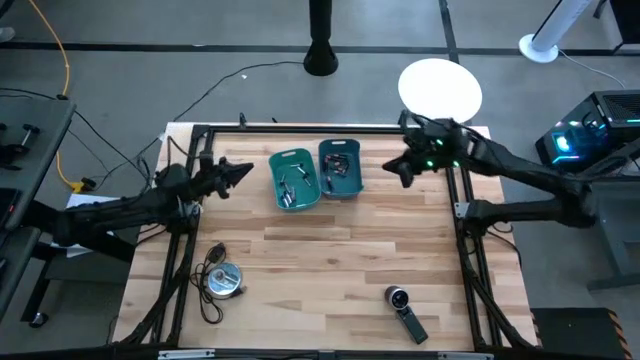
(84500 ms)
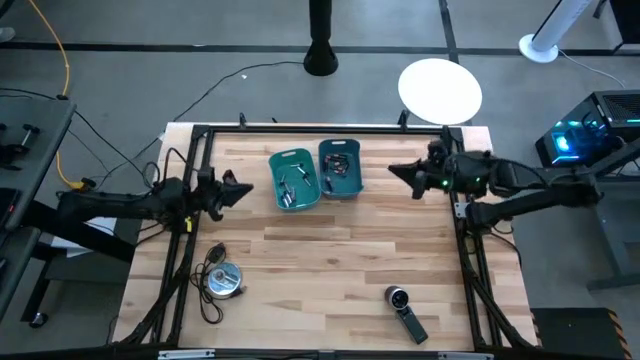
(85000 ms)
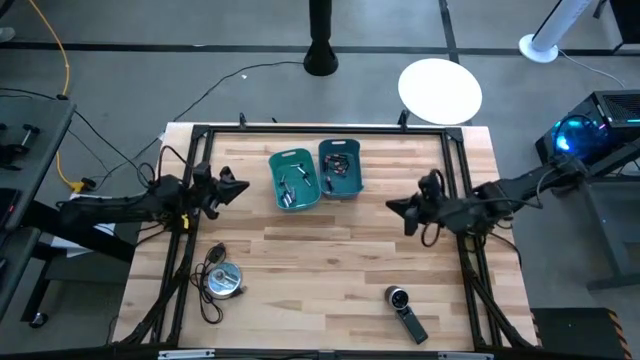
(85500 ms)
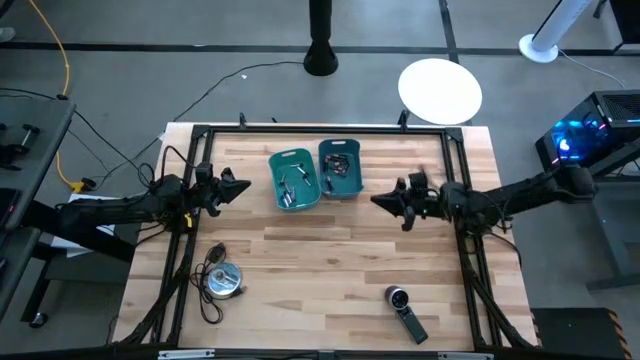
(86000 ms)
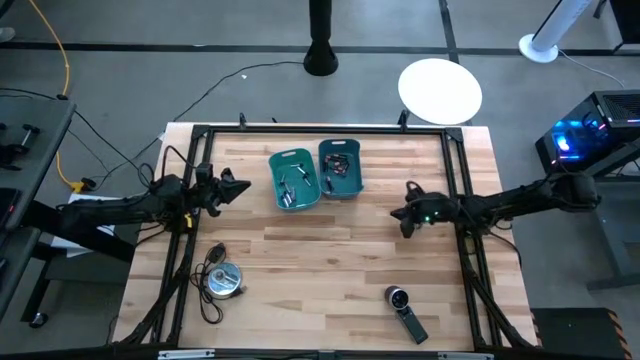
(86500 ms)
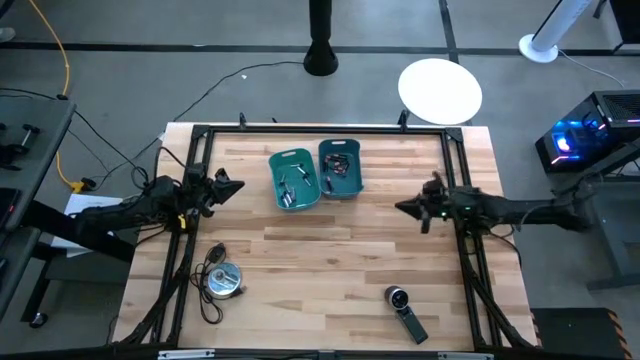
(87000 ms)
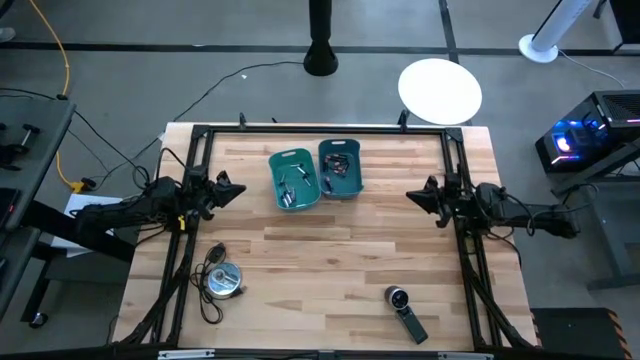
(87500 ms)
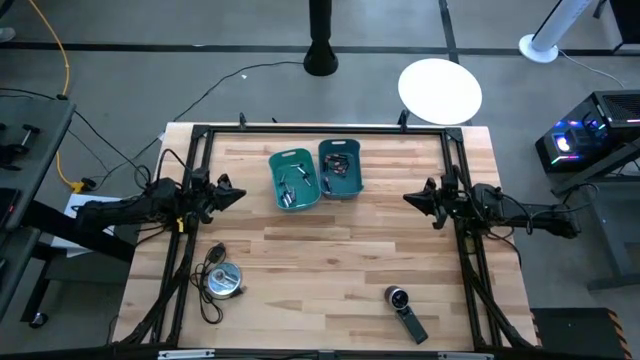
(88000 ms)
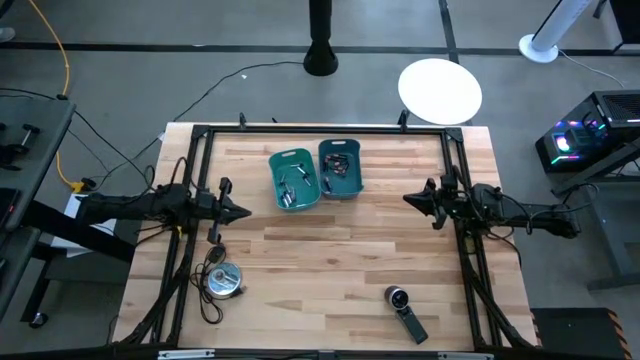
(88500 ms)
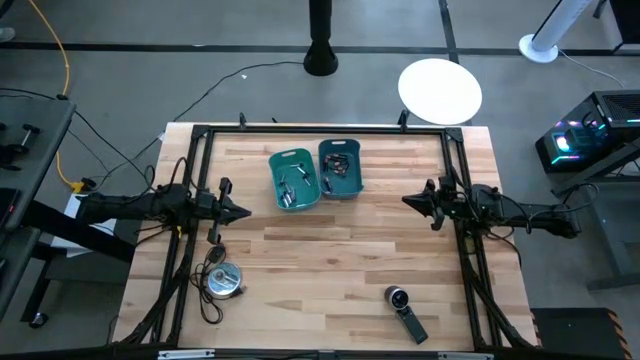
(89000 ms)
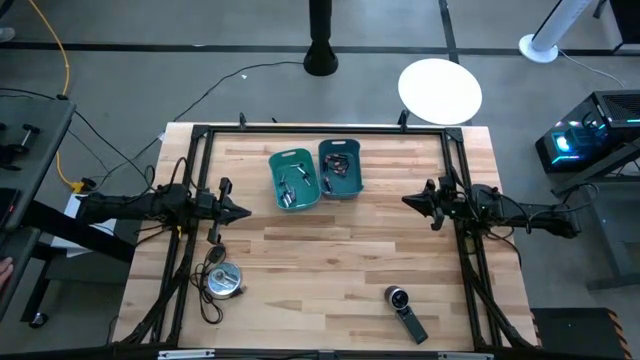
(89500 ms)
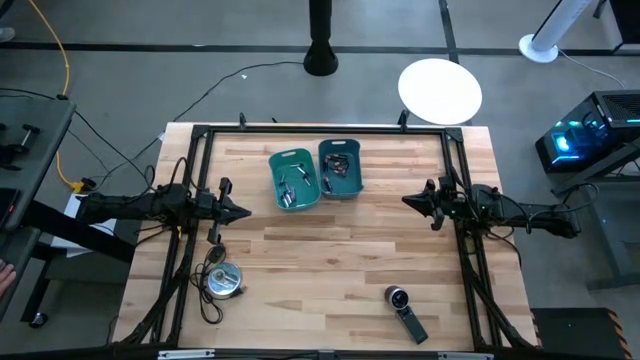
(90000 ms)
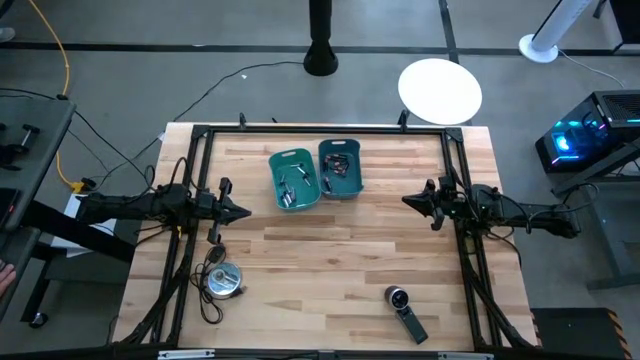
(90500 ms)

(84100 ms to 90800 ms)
Task: Sort batteries
Return to Home Position

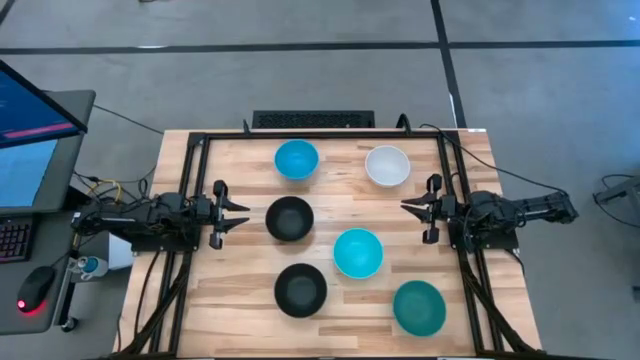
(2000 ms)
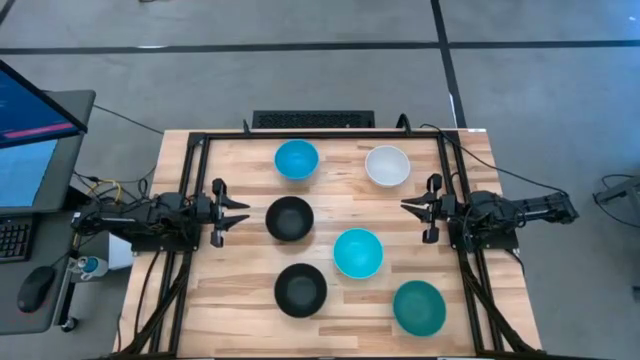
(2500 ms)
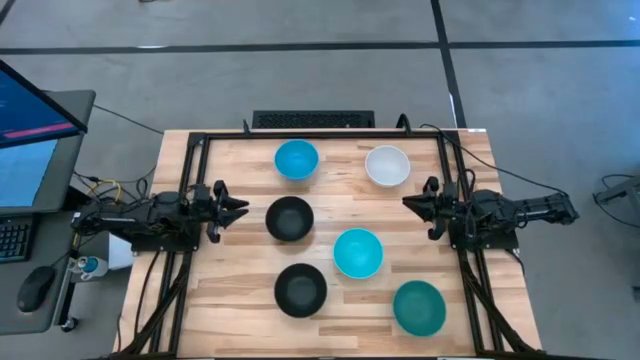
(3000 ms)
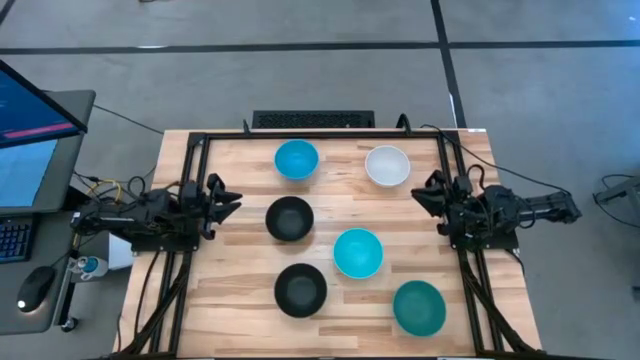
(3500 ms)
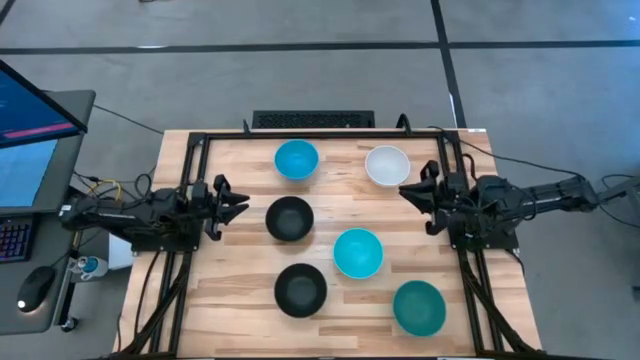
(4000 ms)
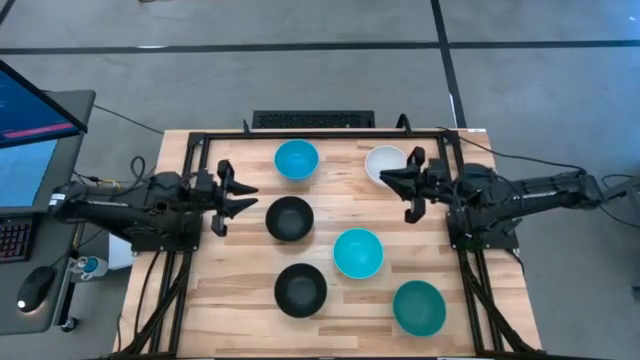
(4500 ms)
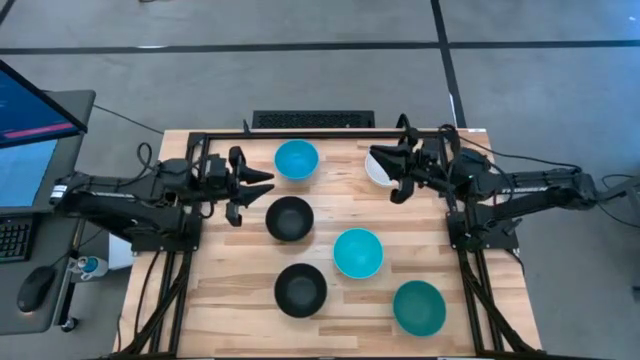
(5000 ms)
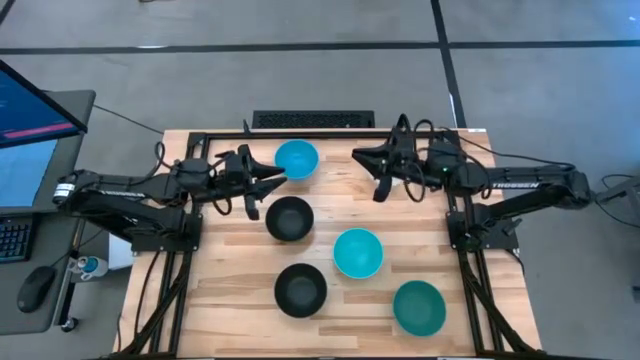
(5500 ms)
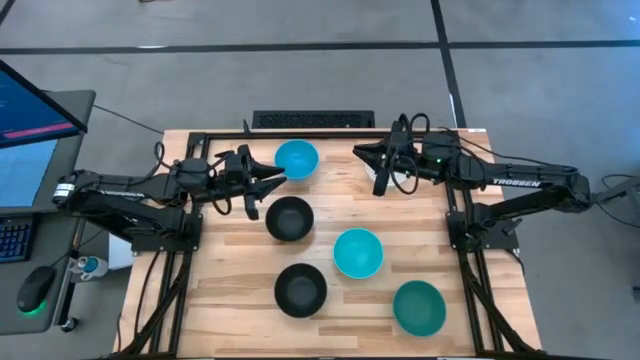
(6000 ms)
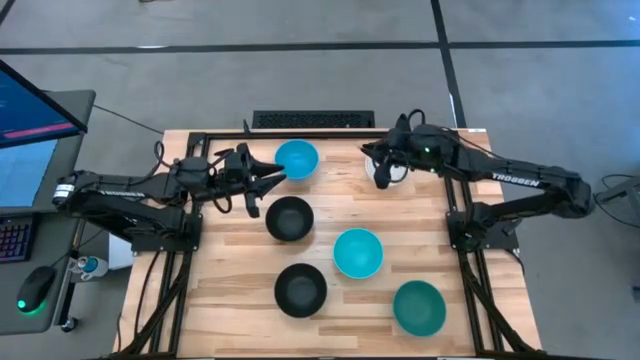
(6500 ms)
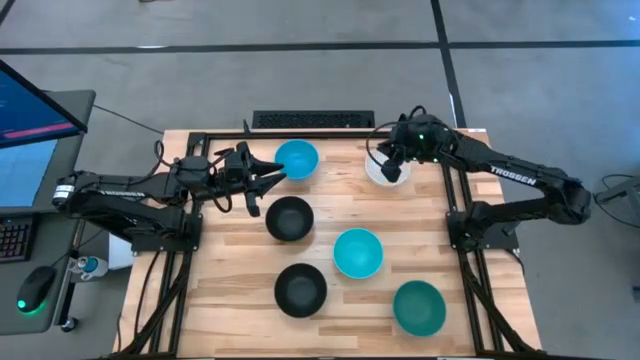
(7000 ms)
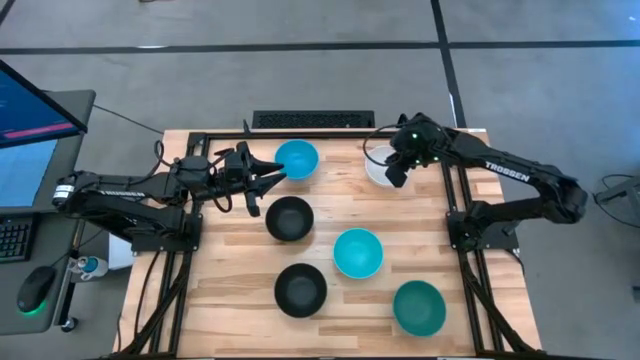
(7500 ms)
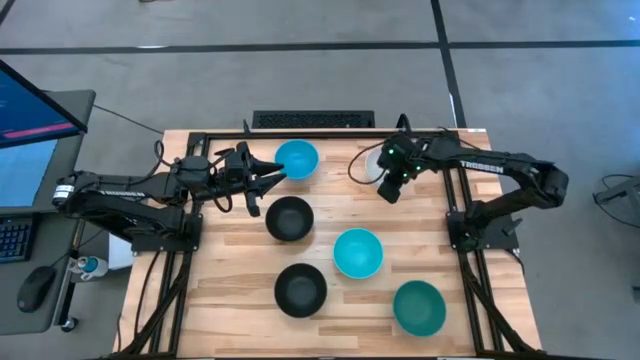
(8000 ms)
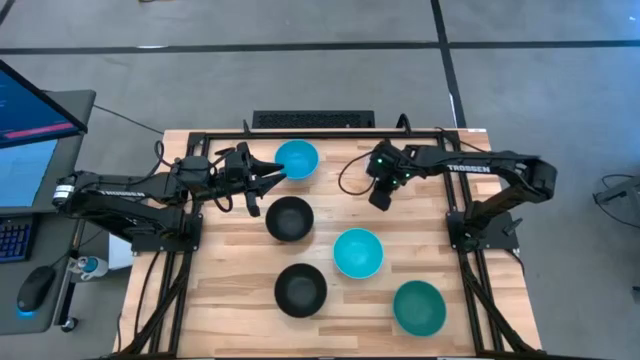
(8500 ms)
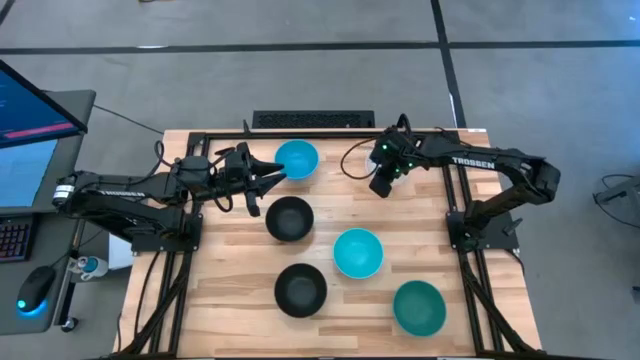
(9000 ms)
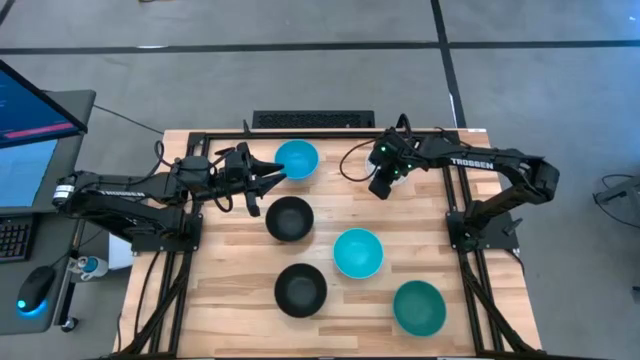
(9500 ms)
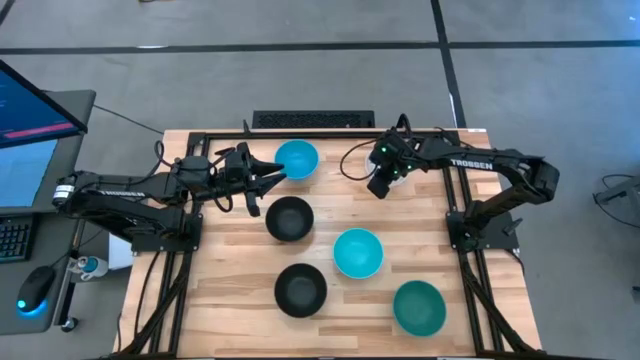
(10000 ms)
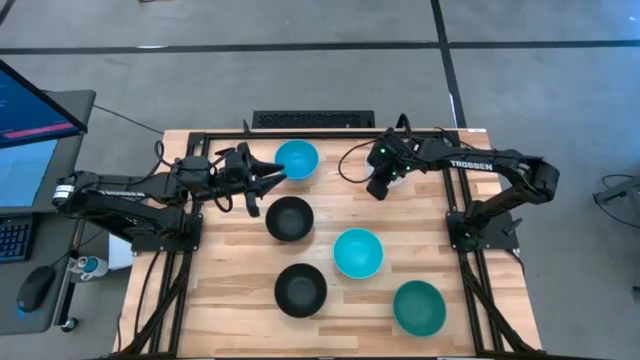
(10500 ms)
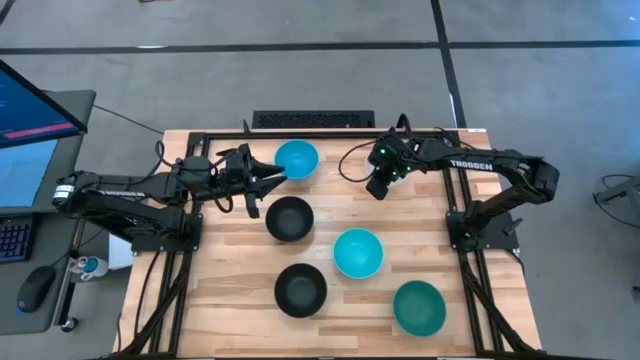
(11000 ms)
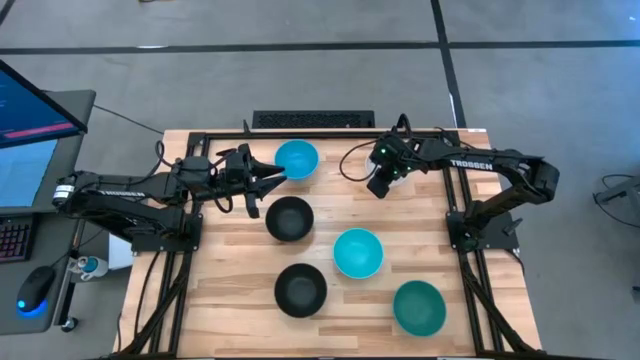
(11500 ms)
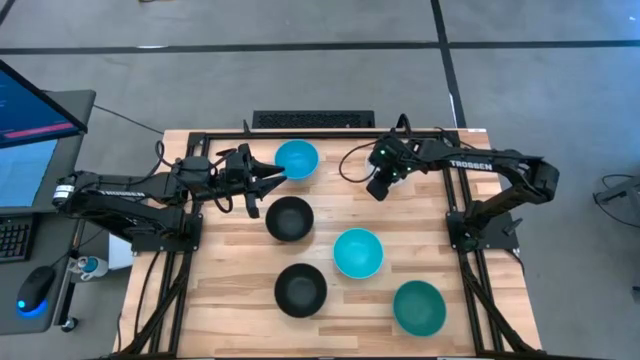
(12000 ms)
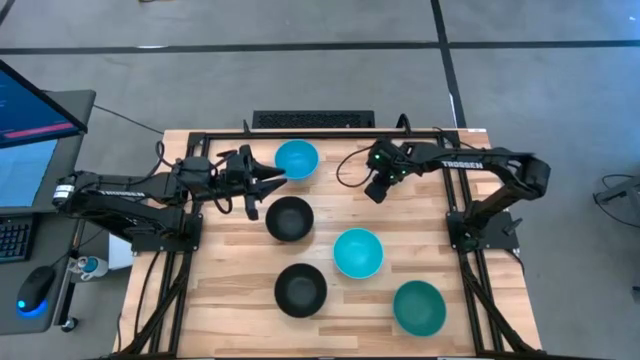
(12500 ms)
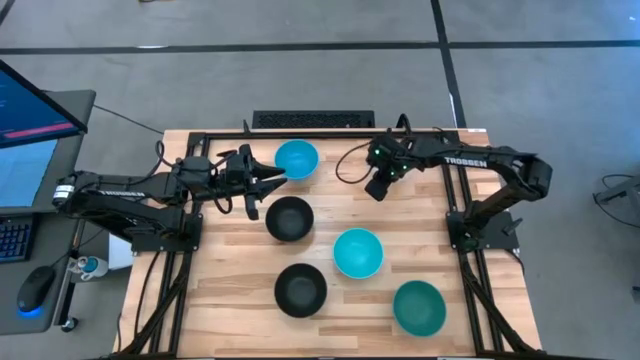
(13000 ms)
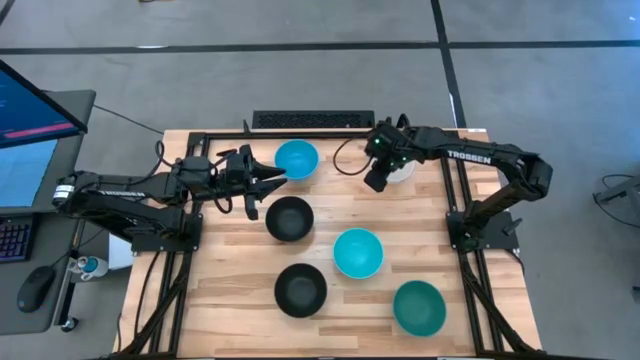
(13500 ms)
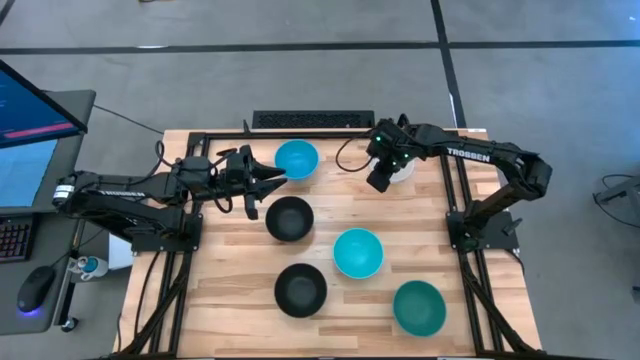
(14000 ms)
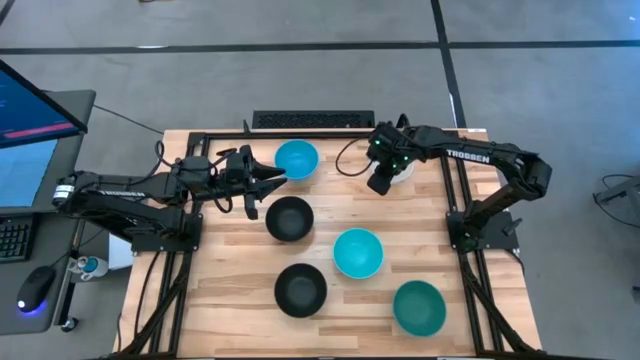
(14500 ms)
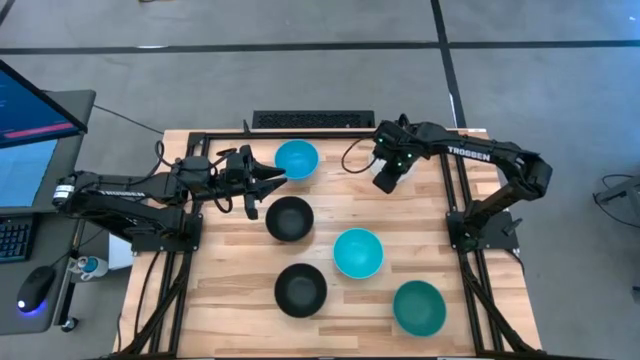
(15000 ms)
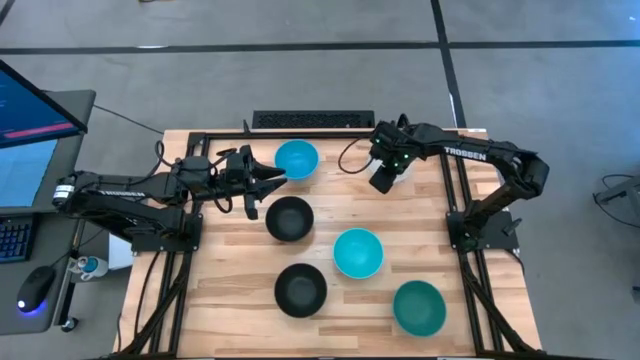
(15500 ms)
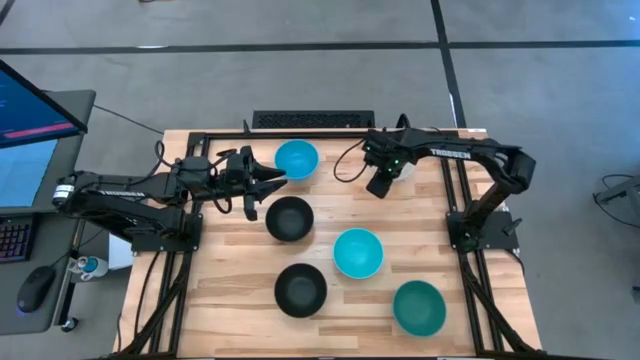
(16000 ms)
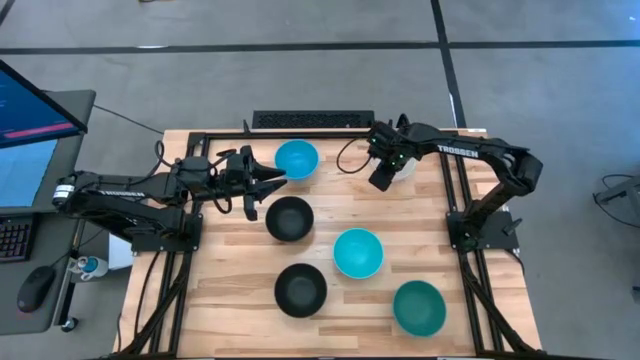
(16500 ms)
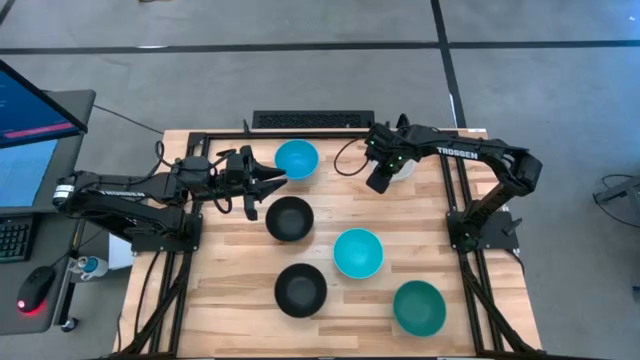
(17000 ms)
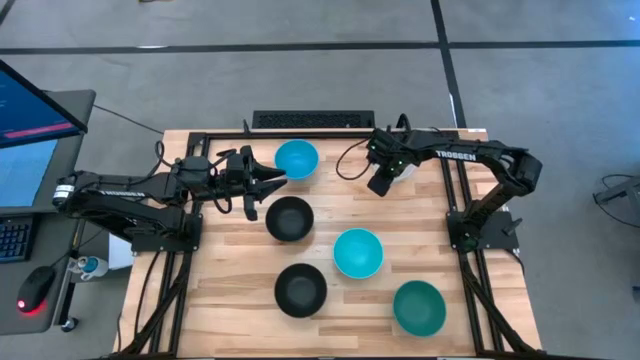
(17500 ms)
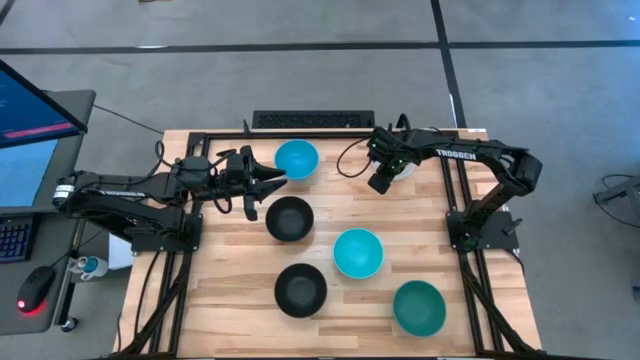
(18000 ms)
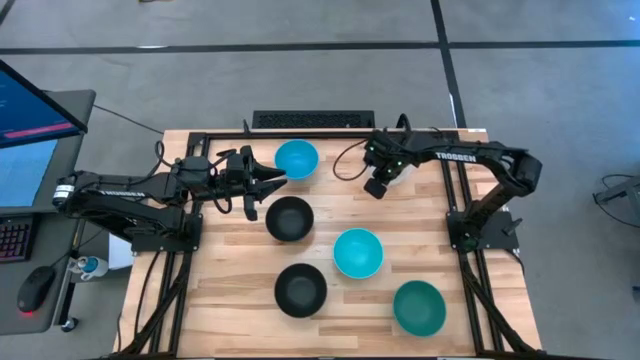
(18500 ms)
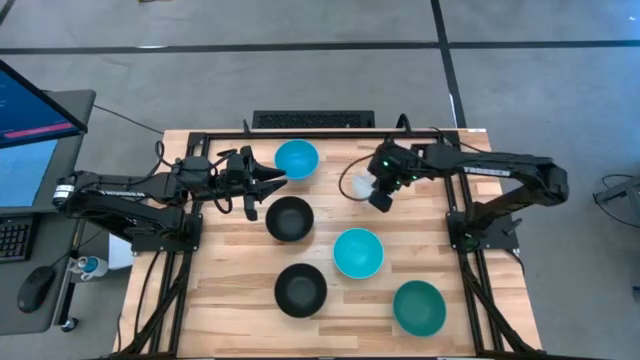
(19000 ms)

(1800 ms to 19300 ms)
Task: Nest bowls inside each other
Stack the white bowl on top of the light blue bowl
